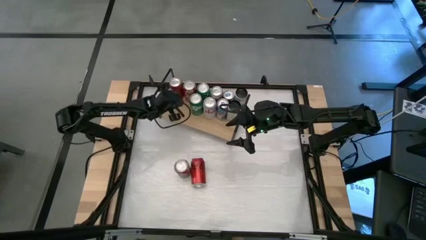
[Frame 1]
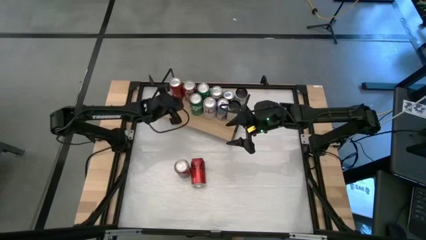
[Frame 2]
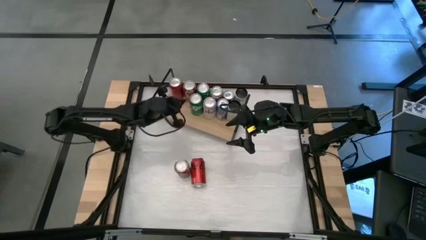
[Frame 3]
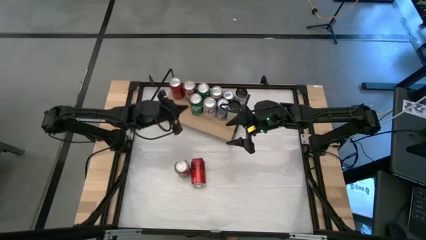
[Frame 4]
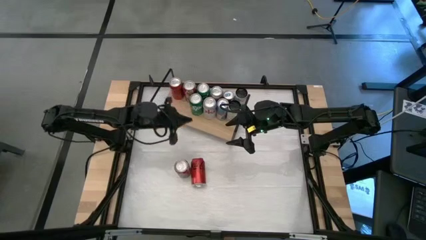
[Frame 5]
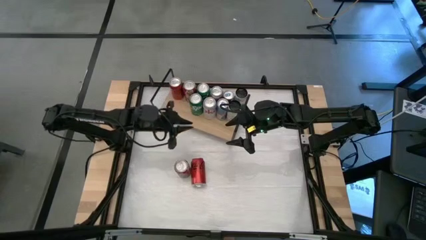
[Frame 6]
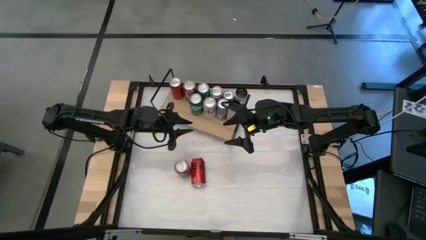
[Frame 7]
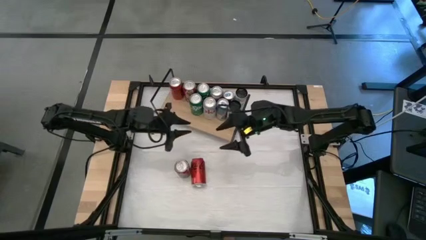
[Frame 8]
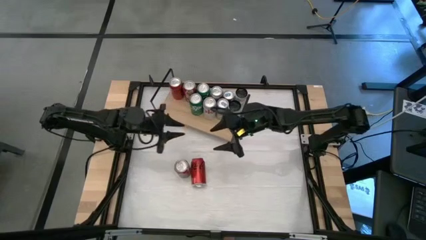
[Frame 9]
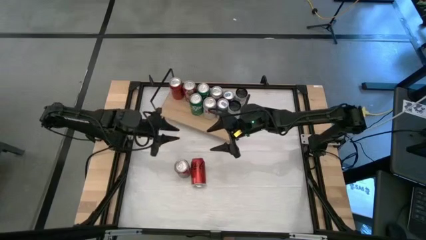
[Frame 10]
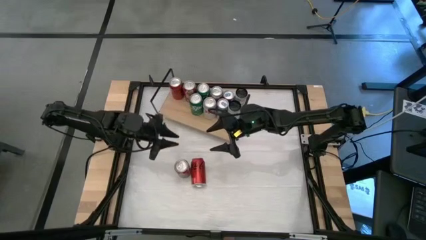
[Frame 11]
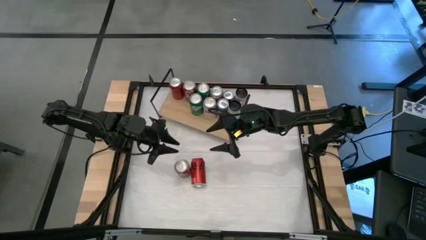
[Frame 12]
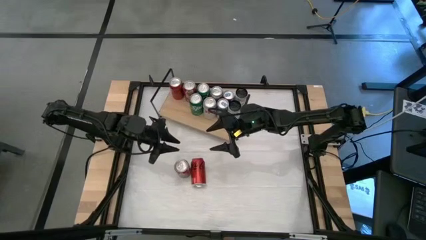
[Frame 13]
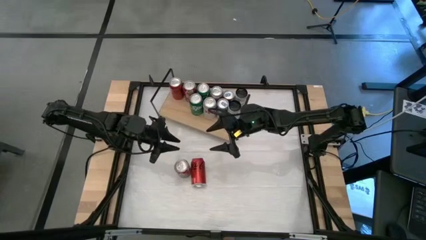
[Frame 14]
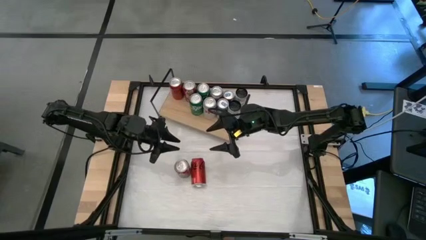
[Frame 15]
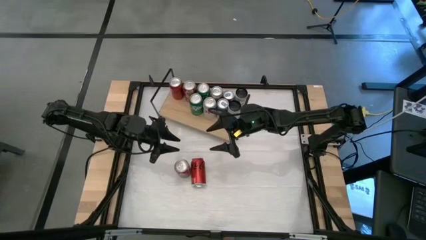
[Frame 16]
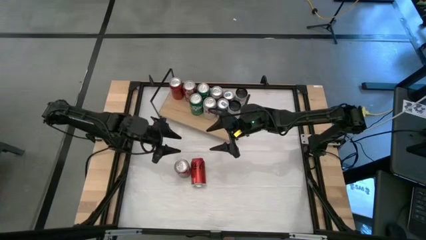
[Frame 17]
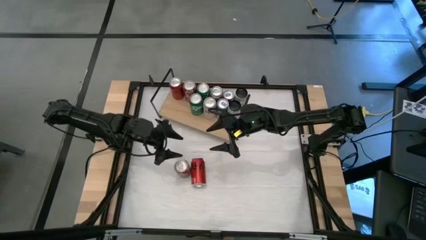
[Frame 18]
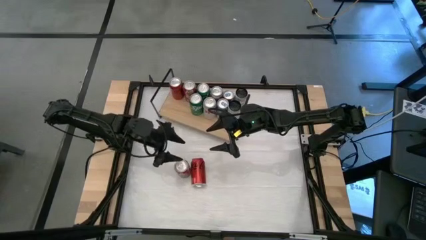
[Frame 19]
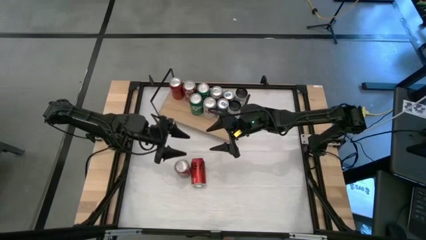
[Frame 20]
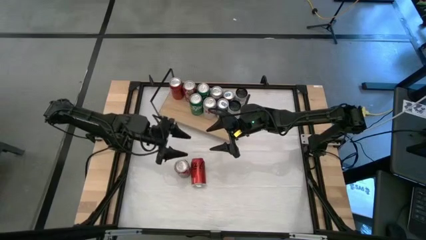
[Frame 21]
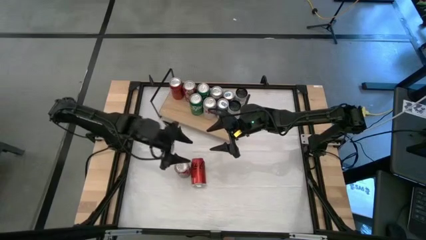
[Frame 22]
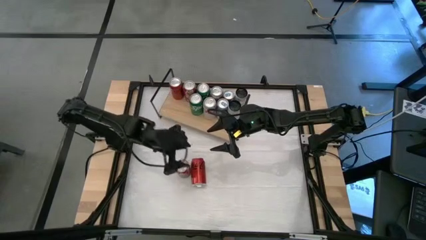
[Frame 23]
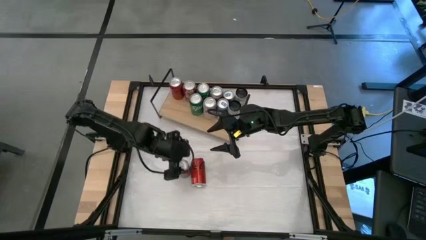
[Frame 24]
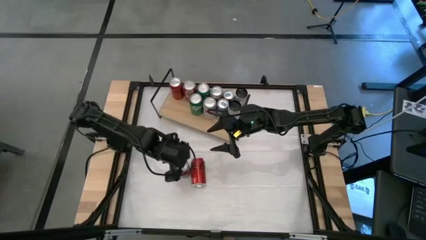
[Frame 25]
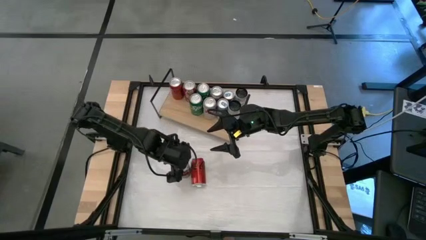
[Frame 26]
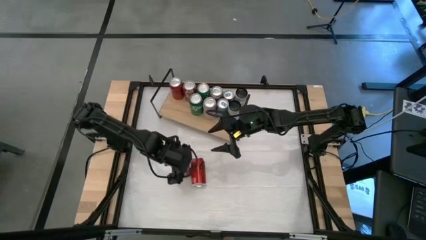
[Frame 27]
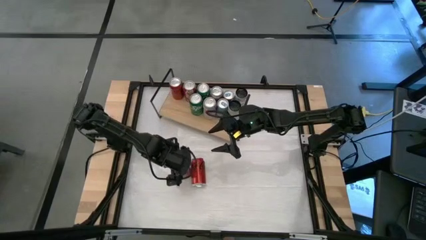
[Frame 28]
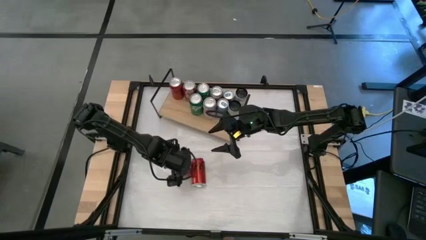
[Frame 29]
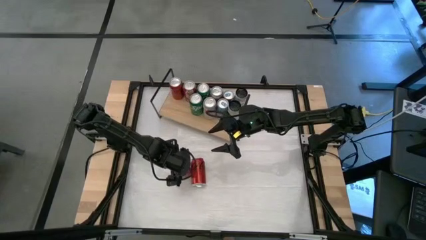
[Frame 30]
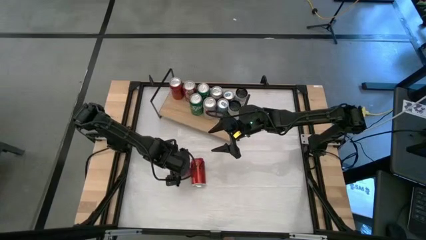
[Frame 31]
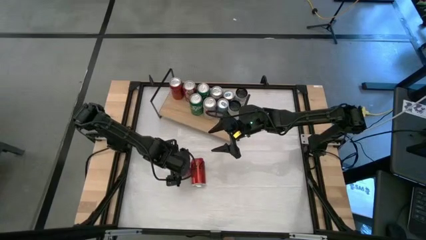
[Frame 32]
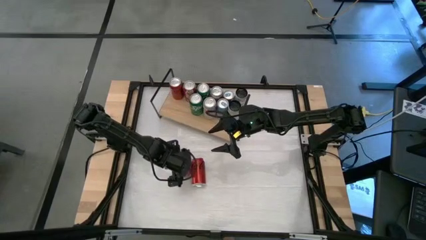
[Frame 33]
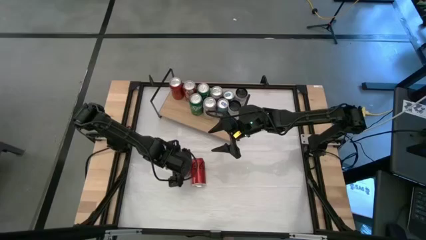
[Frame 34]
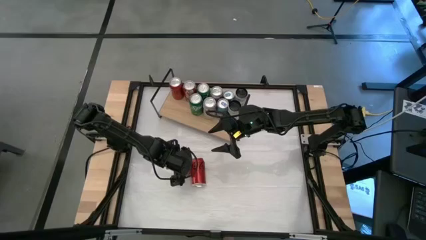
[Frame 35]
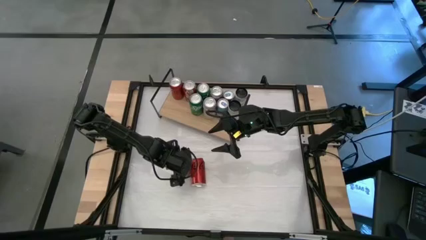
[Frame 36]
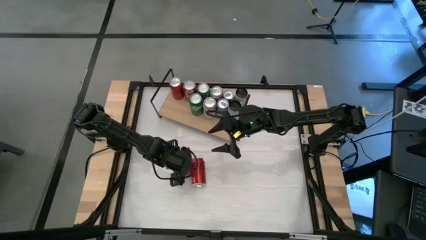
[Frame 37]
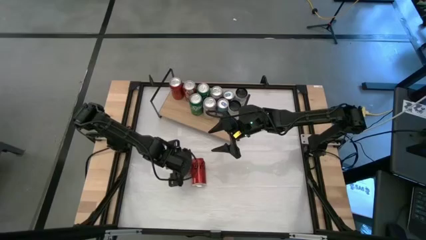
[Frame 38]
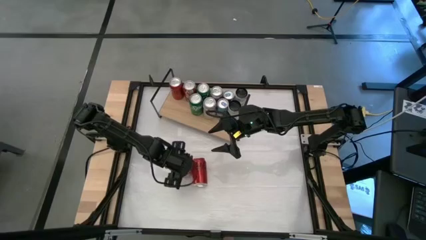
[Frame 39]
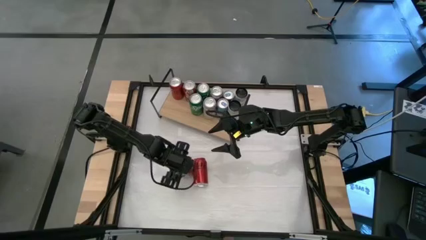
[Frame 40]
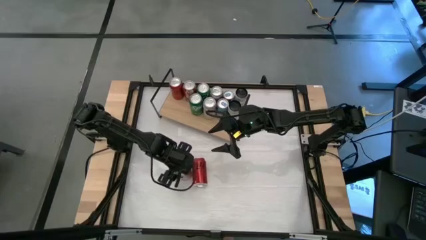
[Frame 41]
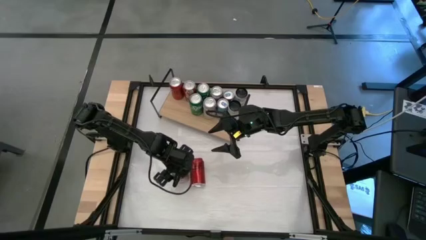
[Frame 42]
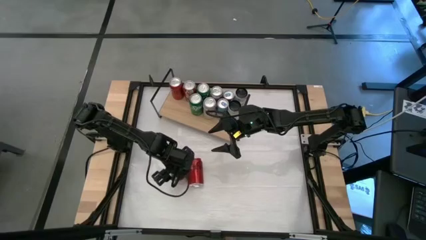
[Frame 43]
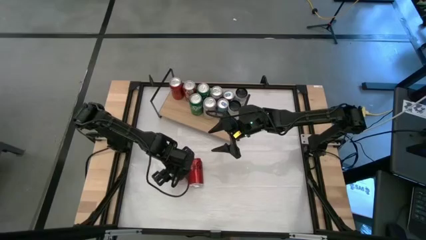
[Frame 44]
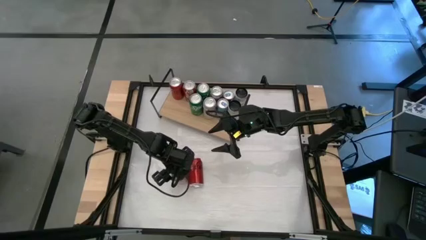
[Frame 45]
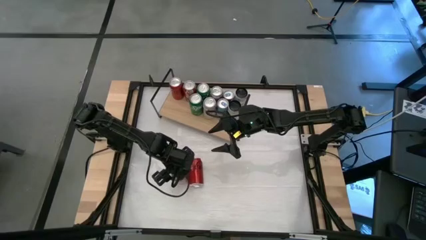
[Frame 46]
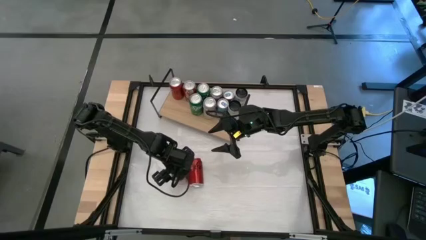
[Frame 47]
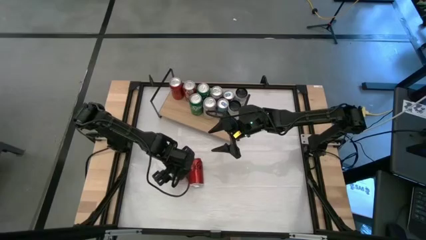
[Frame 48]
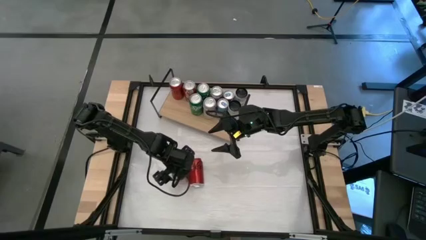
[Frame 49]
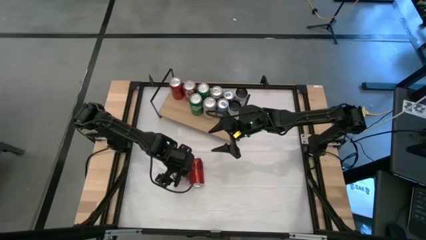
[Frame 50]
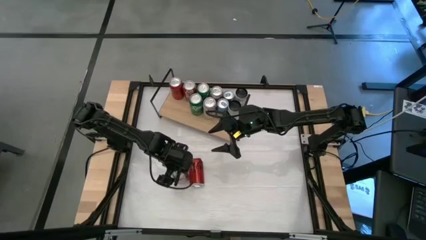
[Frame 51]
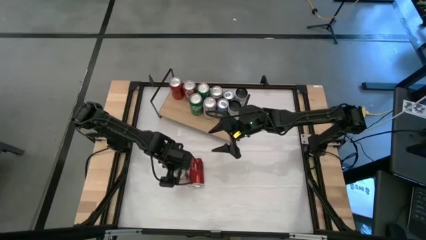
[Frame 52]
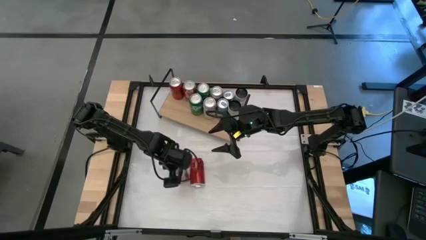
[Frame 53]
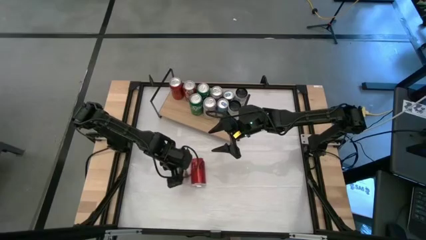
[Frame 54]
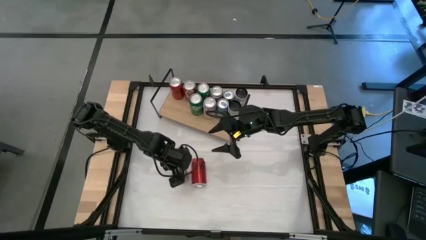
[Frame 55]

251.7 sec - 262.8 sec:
Task: Place canned beverage on shelf
Put the red white soda can on the shelf aligned with other red white soda can

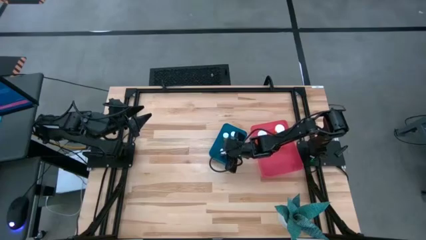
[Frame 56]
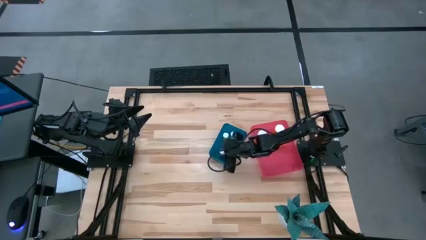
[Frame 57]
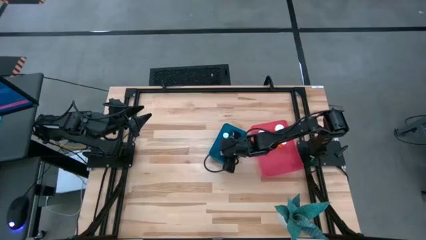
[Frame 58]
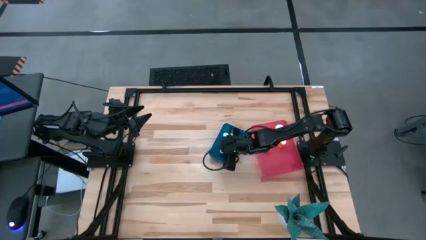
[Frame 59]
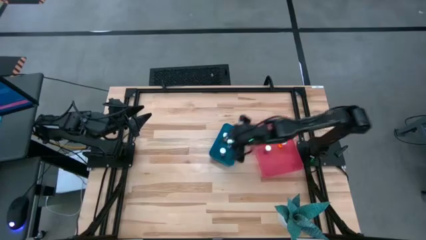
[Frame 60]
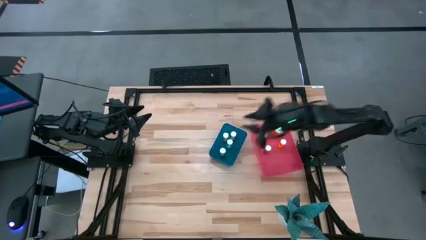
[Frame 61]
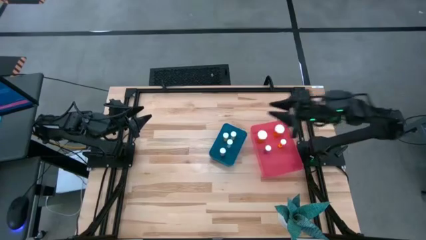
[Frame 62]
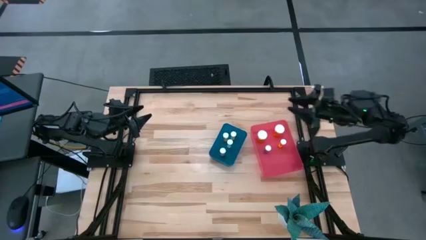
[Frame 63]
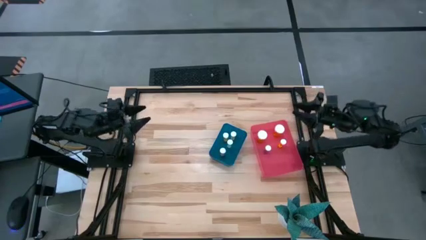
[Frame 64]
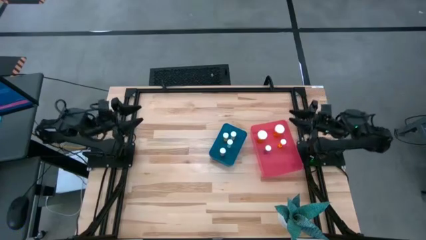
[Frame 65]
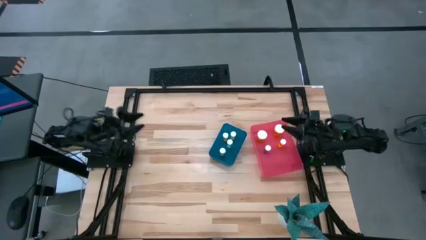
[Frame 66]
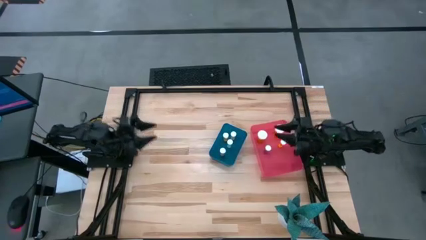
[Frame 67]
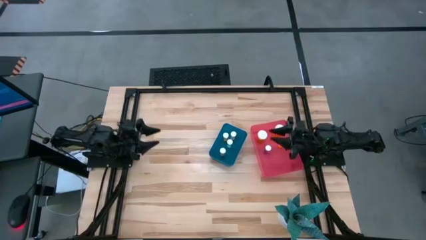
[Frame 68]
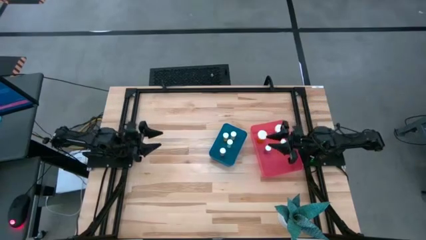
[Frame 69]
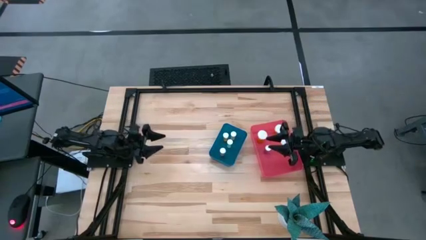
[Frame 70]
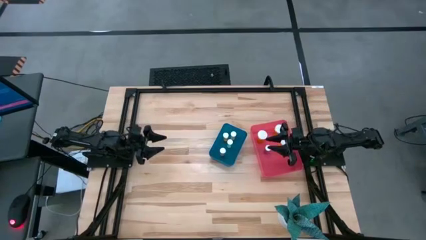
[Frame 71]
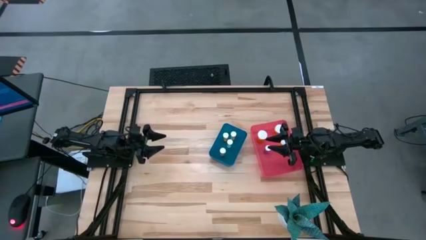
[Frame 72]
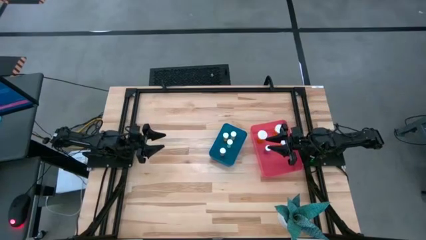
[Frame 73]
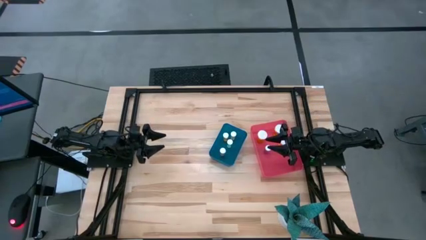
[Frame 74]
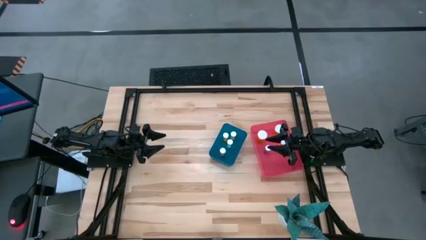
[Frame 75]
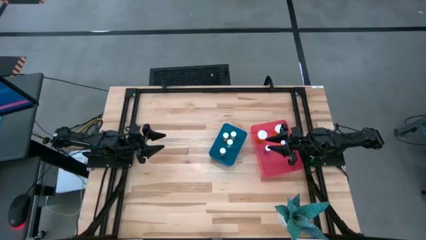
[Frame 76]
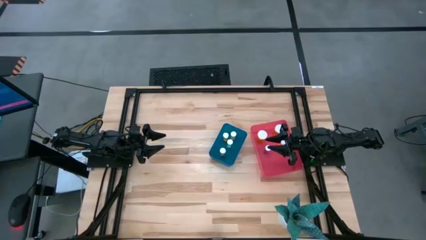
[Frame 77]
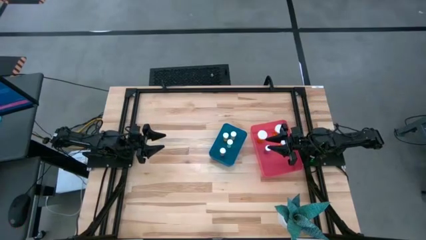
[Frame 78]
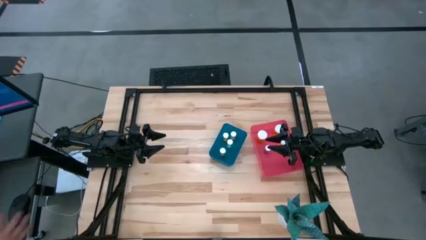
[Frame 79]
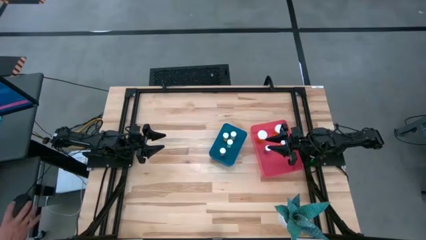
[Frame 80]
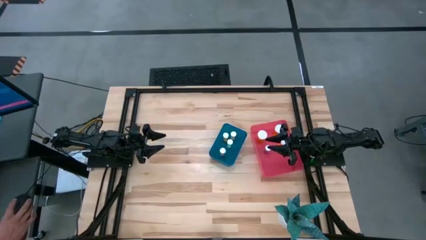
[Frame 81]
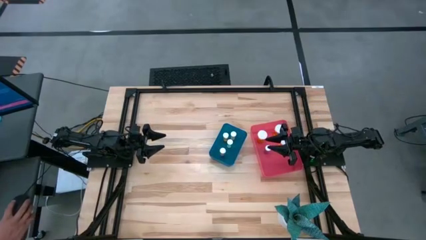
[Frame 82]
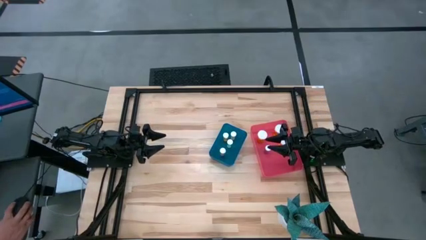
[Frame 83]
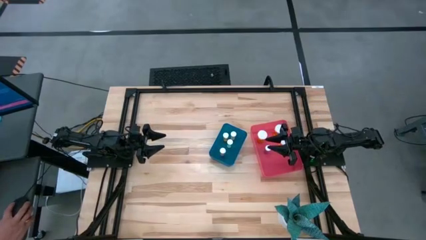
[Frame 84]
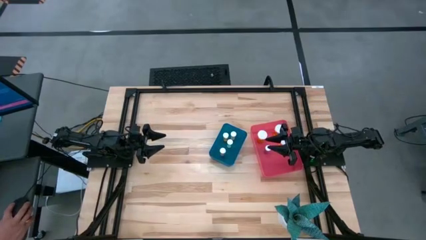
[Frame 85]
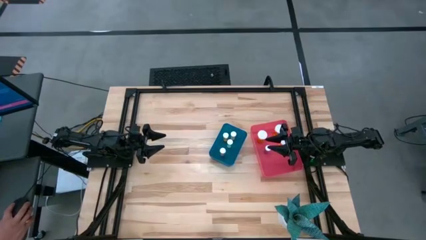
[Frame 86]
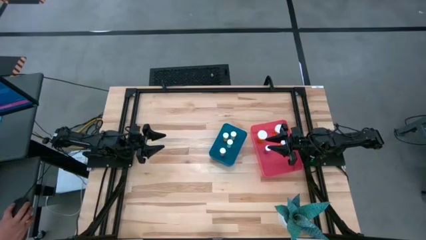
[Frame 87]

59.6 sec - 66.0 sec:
Task: Pick and place medicine bottles into bin by pill shape (circle, oval)
Return to Home Position
